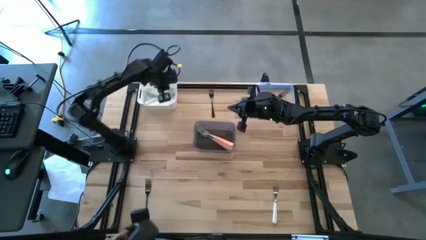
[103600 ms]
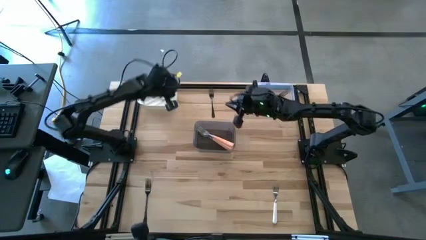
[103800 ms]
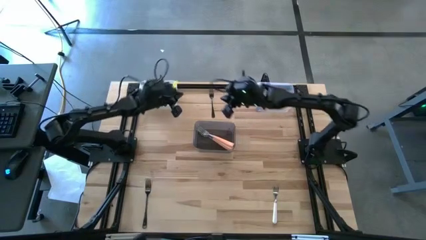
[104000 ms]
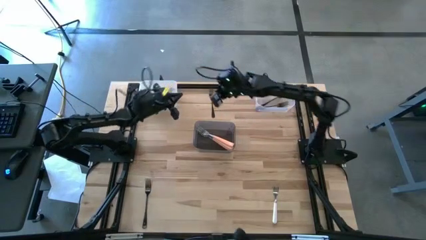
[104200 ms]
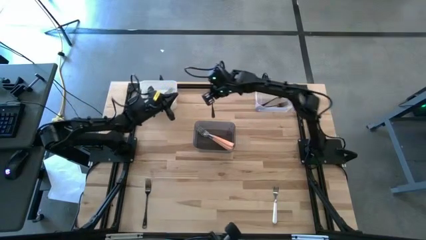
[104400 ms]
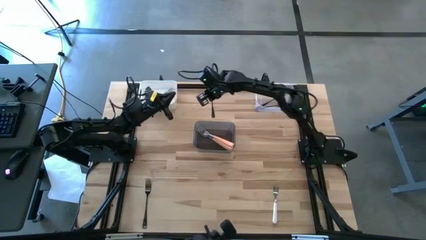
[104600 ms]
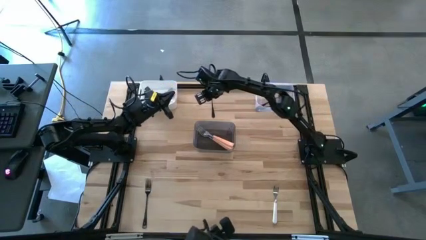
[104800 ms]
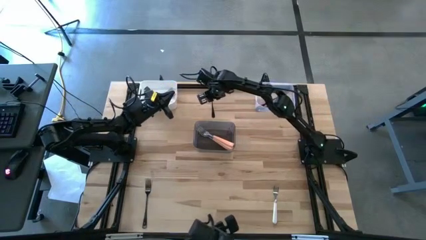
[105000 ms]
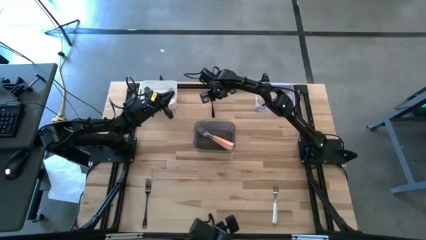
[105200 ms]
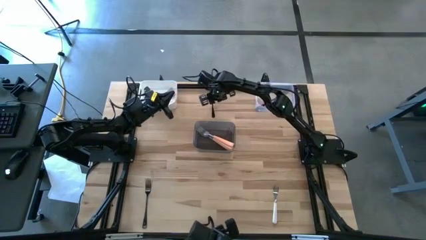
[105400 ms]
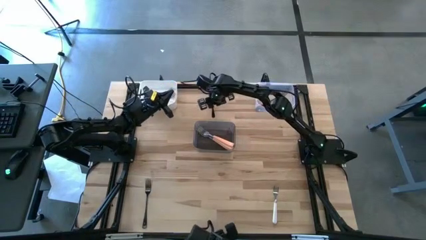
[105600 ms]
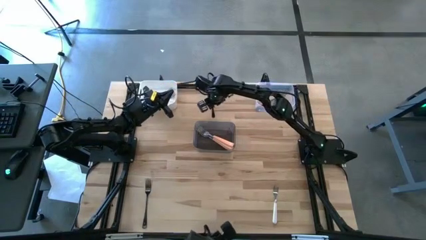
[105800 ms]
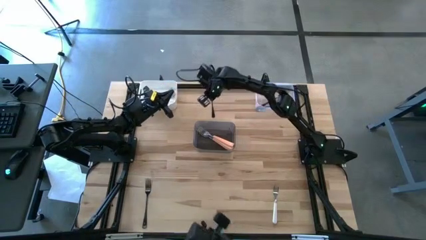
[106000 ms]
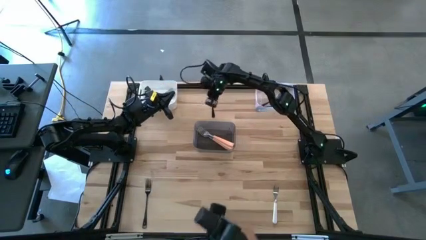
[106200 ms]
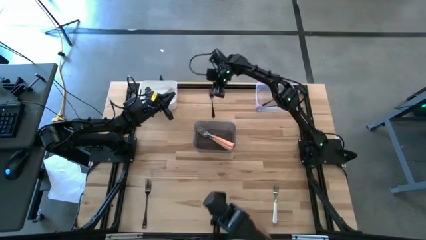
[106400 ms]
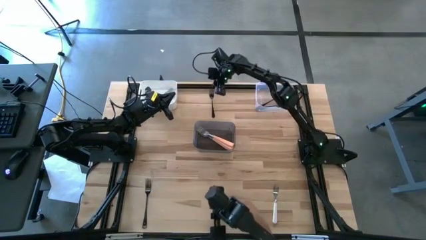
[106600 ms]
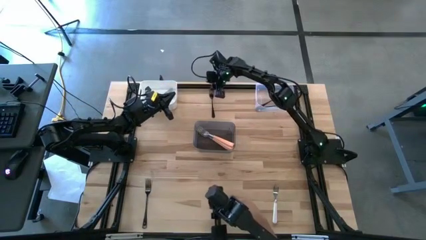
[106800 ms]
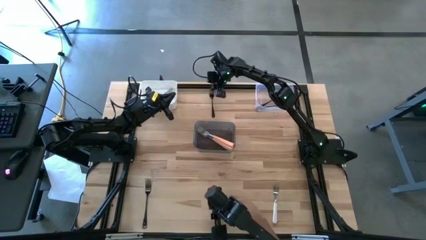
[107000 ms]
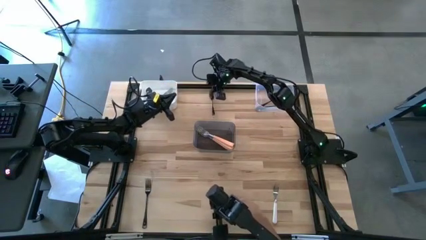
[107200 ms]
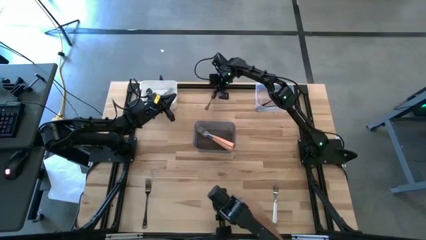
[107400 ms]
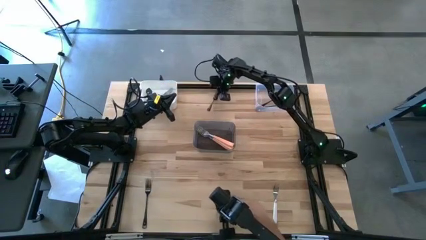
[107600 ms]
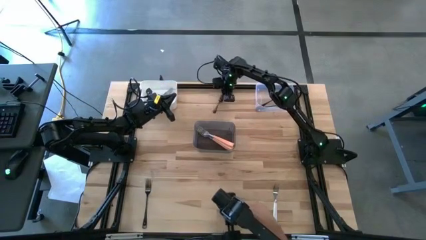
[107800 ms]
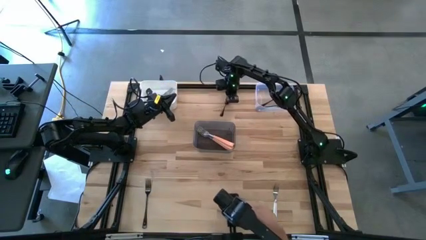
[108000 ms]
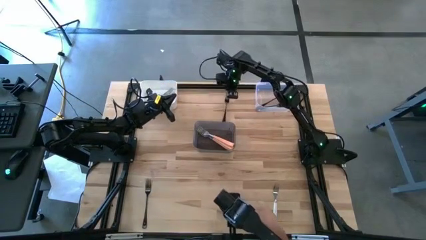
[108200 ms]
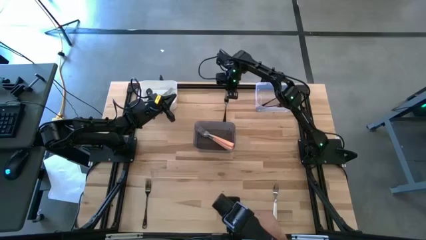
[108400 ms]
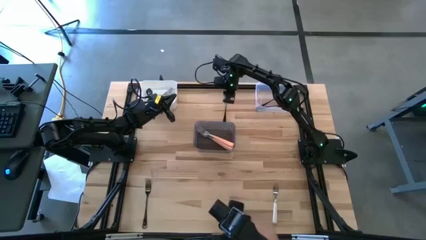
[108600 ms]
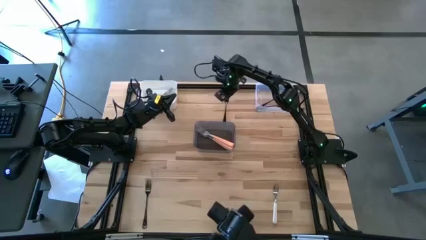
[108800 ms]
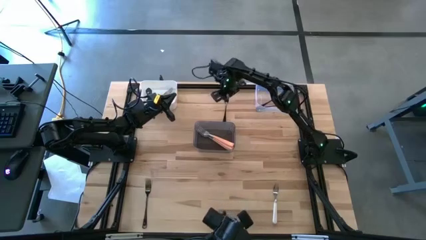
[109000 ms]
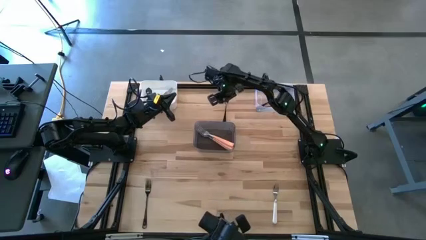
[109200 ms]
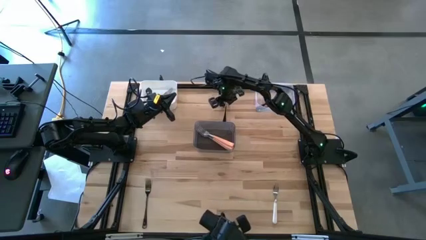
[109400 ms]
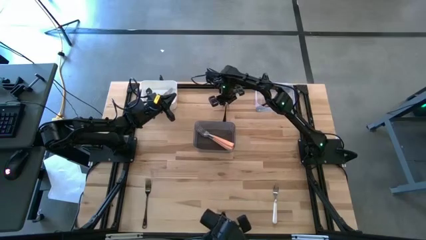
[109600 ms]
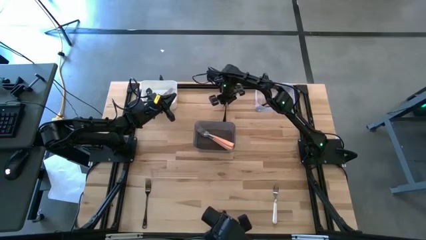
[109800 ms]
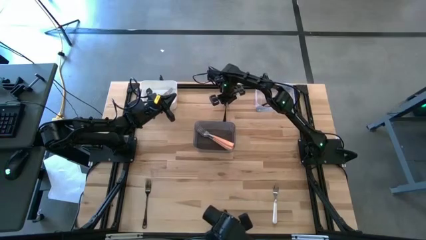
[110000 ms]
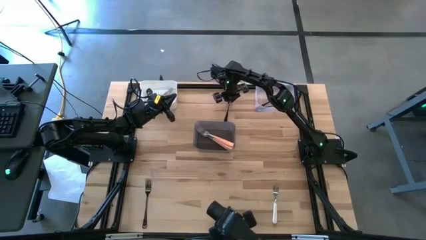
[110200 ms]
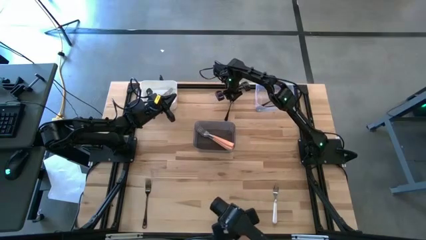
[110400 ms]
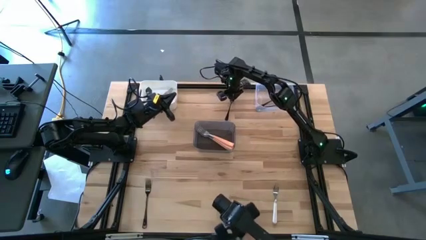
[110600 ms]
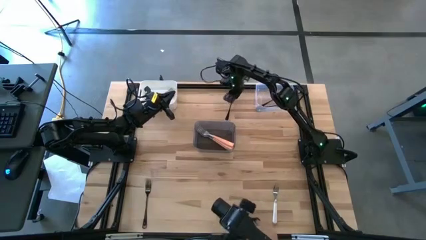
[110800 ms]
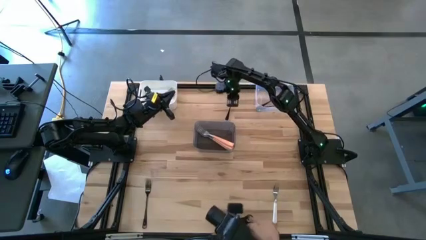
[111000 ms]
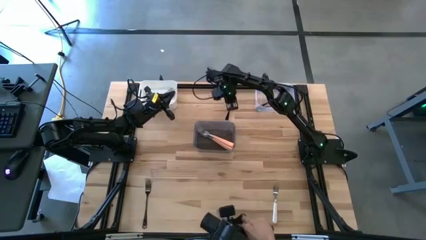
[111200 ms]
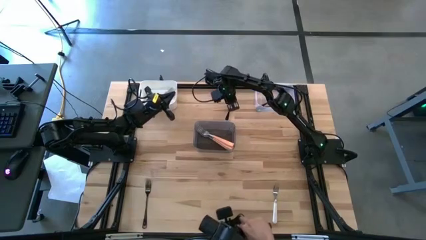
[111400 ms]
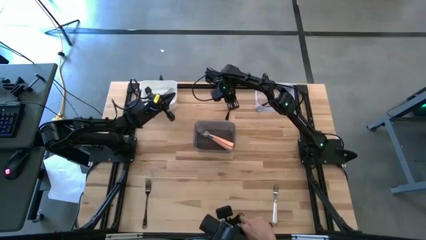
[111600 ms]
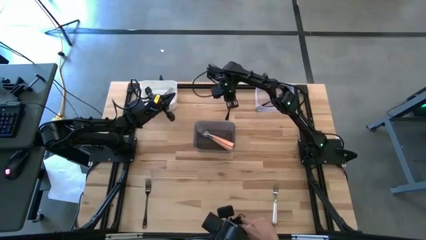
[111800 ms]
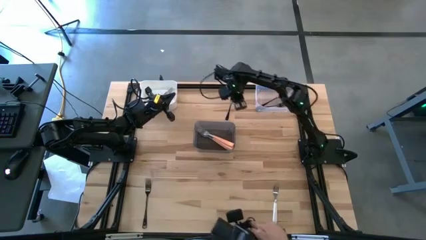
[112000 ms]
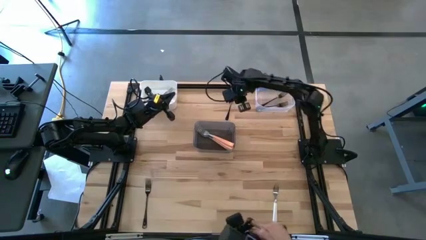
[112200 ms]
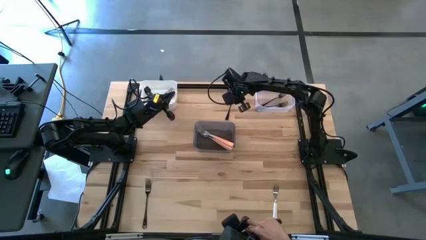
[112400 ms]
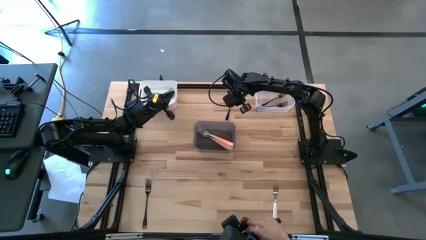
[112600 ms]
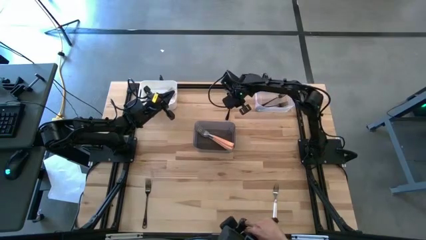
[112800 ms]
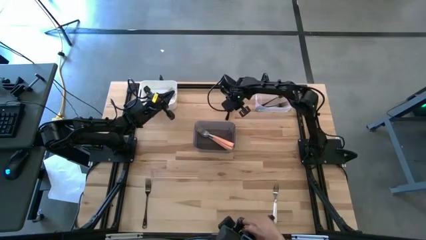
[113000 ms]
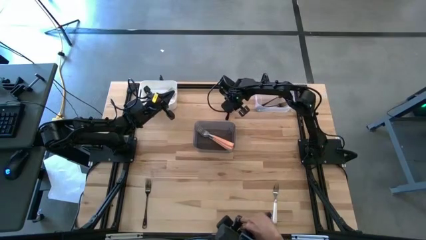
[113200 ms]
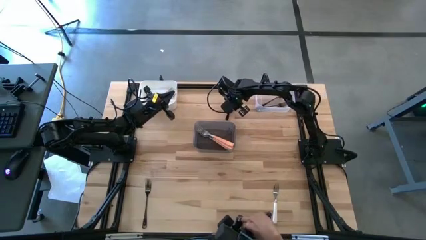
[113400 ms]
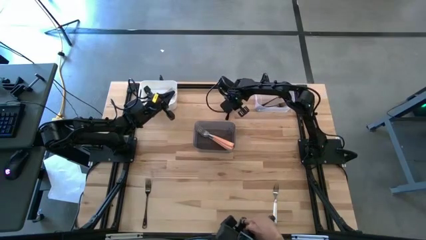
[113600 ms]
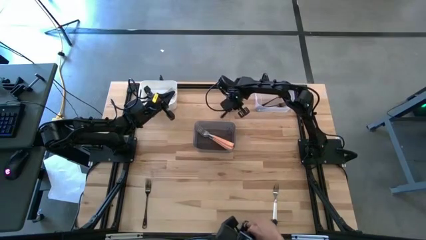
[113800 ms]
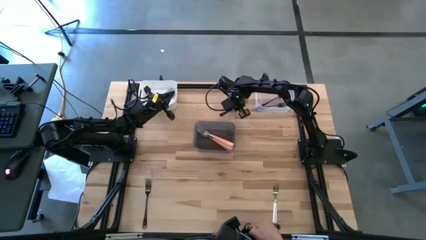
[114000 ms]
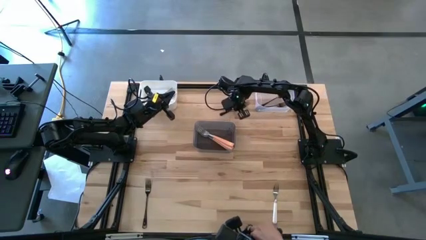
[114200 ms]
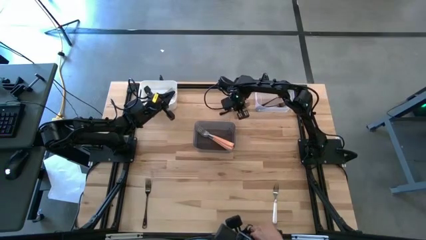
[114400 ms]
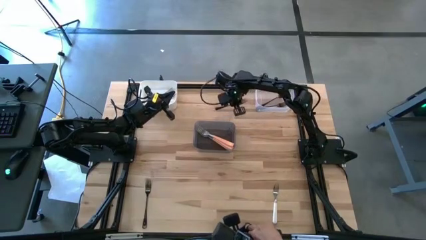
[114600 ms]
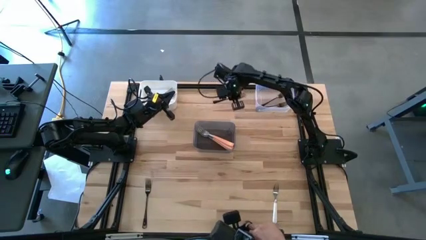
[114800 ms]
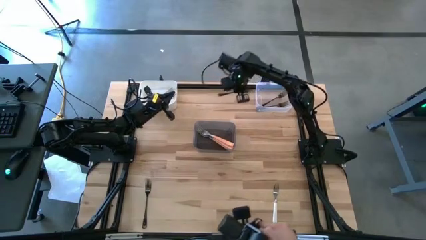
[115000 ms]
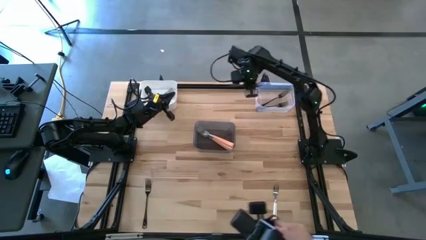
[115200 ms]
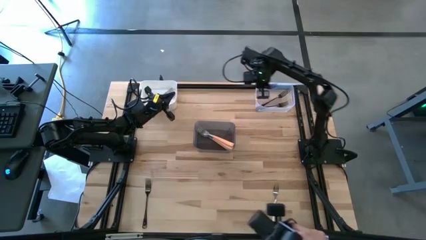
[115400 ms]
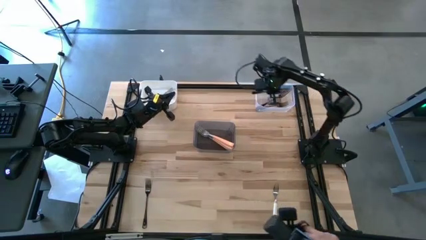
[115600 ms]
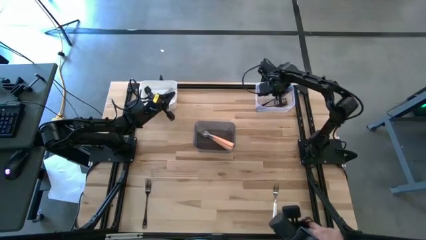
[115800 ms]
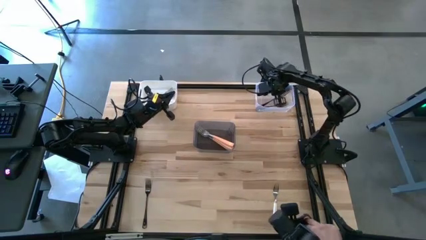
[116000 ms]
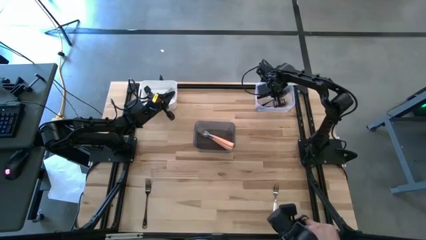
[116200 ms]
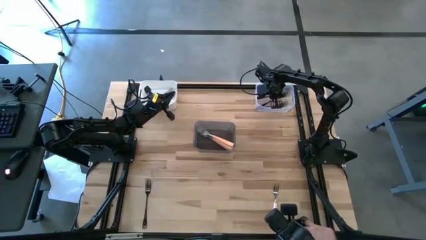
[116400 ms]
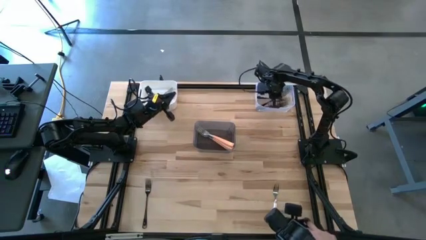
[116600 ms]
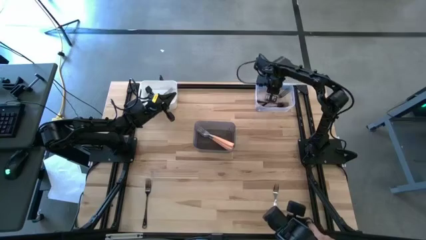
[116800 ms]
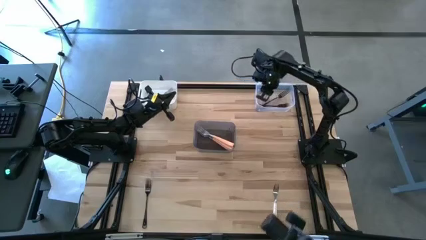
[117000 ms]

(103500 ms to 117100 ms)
Task: Sort silverware by color (type)
Put the top black fork into the transparent bin
